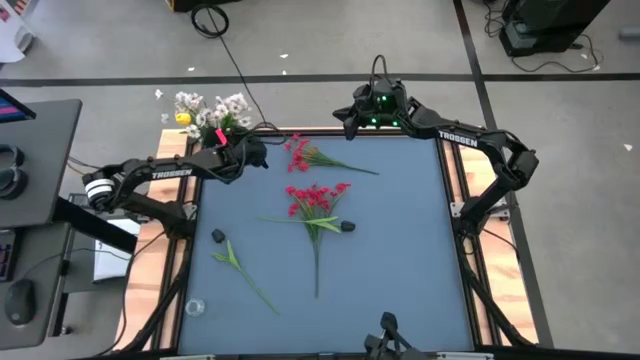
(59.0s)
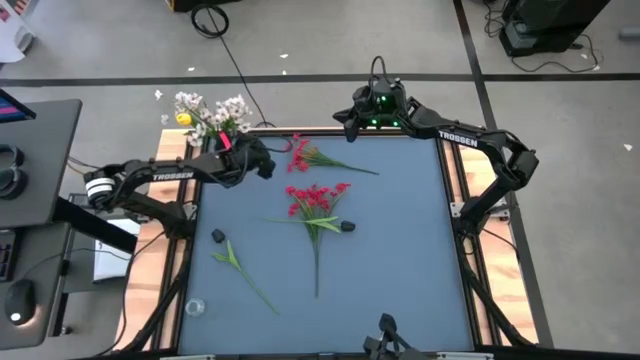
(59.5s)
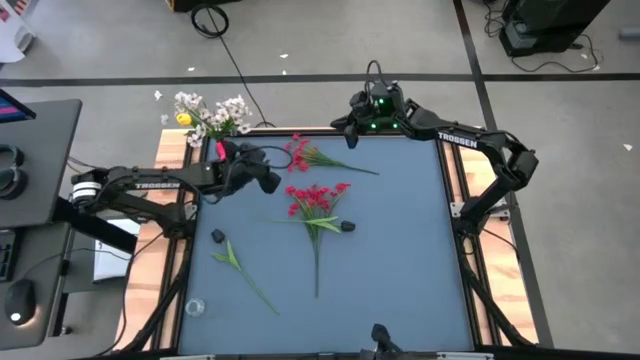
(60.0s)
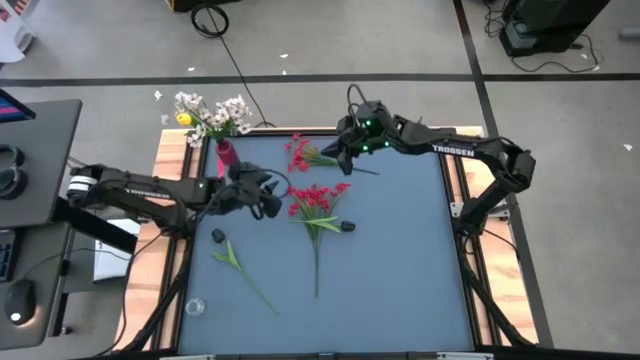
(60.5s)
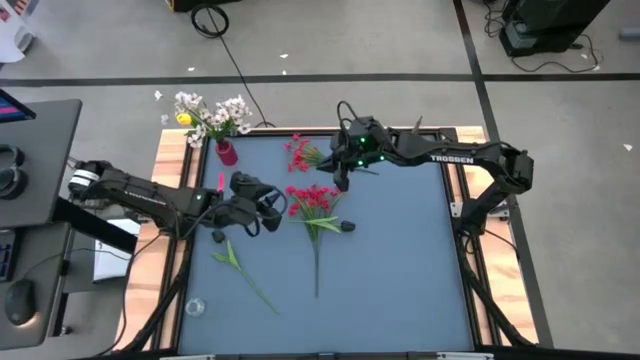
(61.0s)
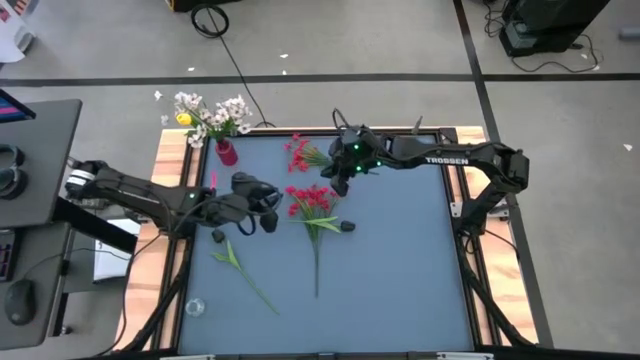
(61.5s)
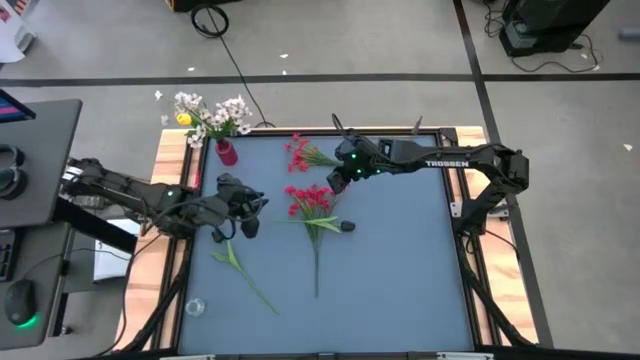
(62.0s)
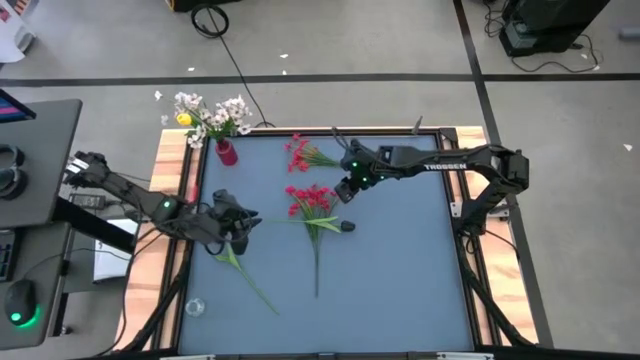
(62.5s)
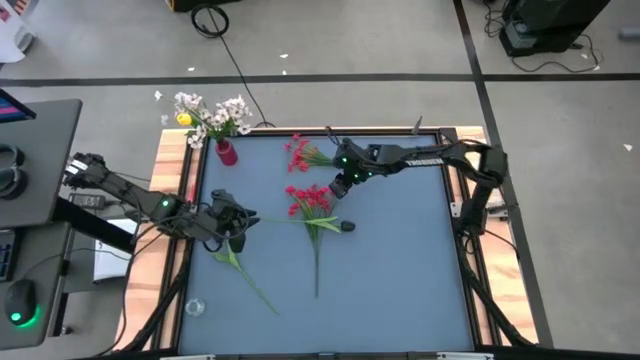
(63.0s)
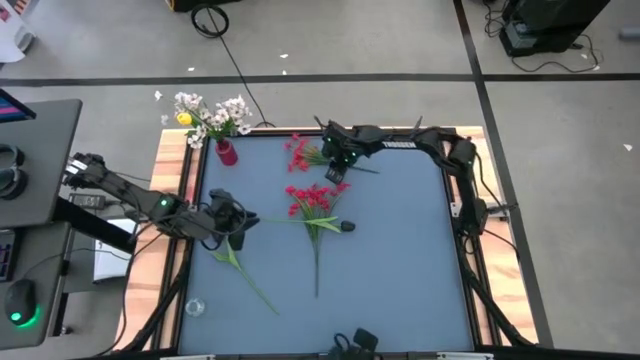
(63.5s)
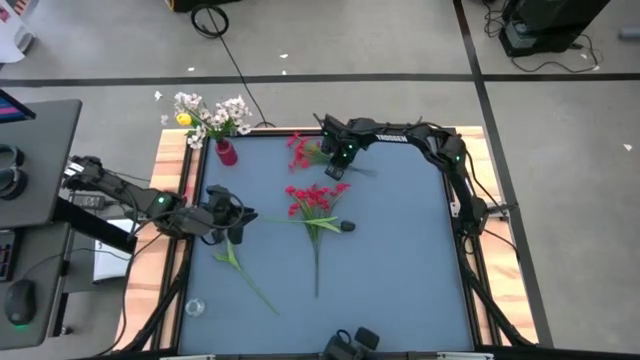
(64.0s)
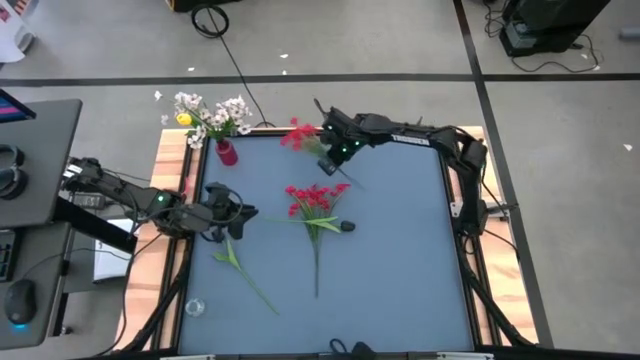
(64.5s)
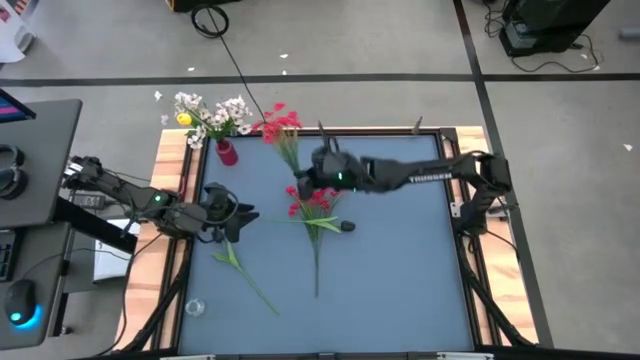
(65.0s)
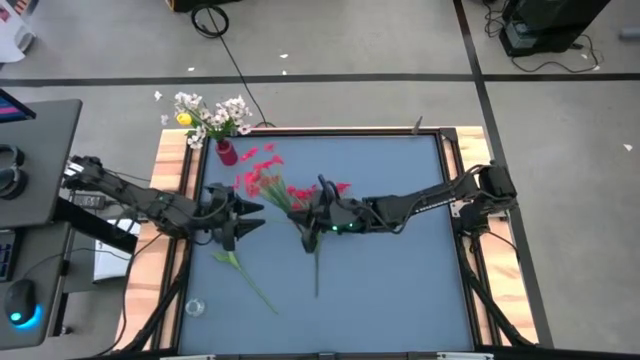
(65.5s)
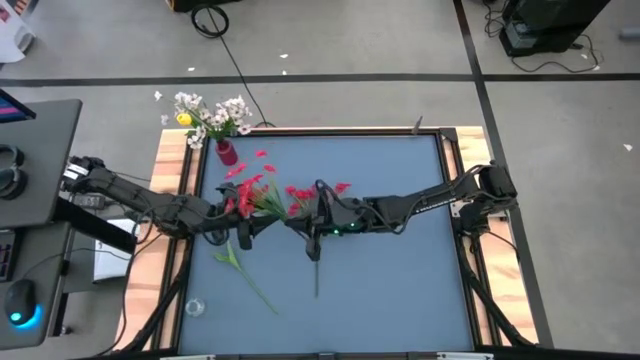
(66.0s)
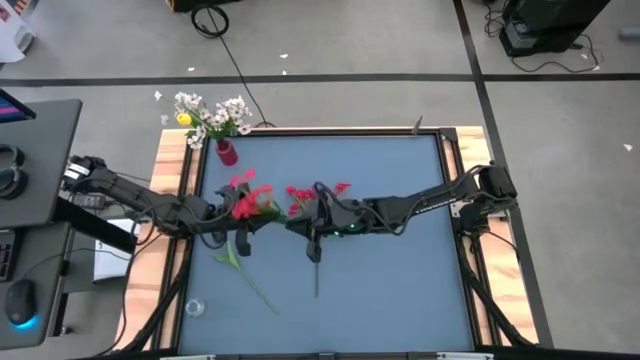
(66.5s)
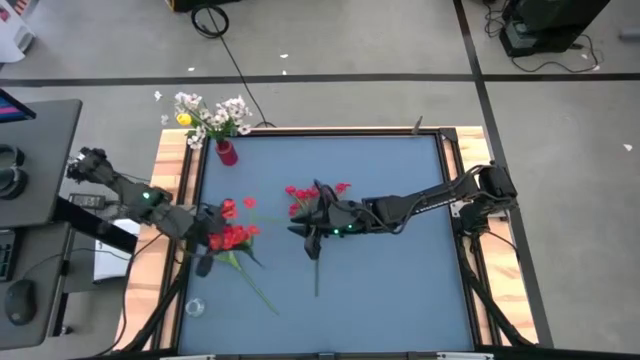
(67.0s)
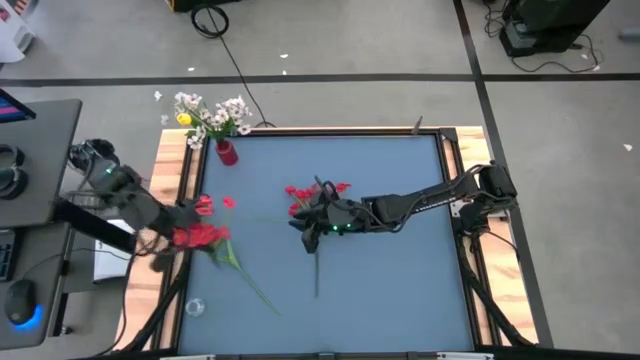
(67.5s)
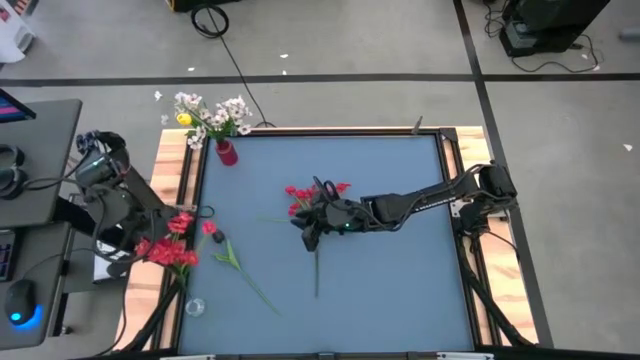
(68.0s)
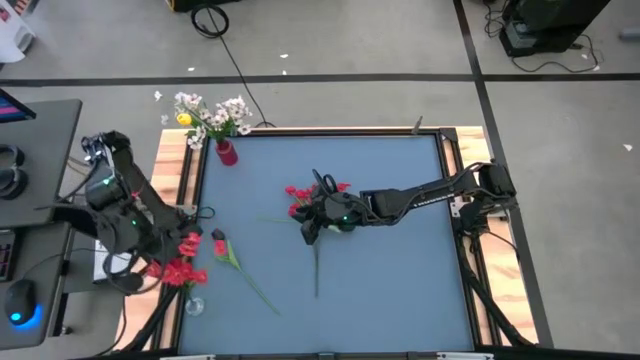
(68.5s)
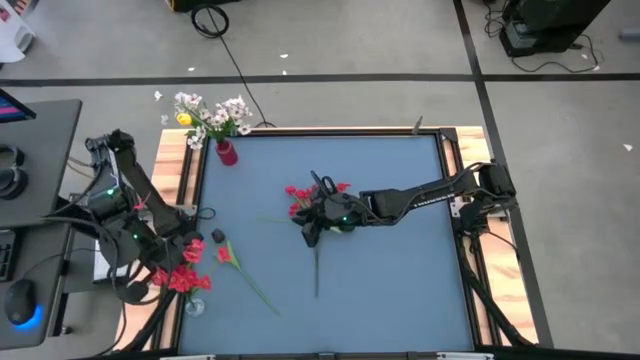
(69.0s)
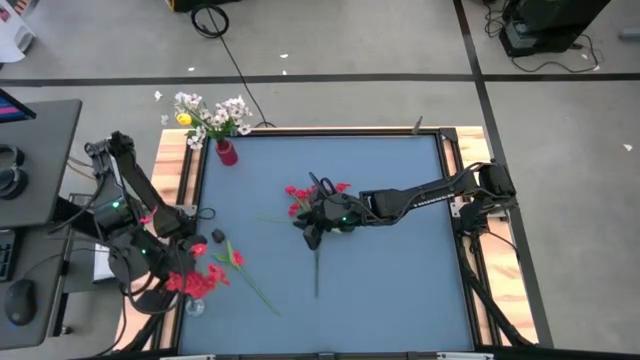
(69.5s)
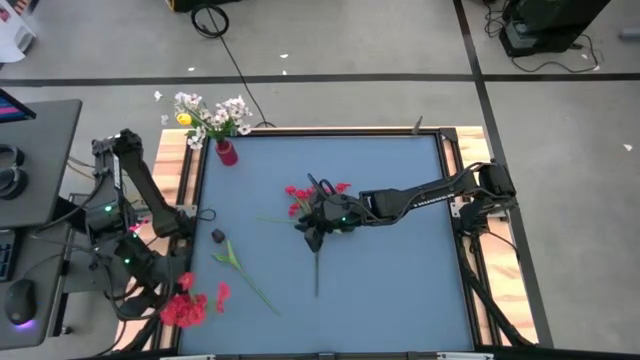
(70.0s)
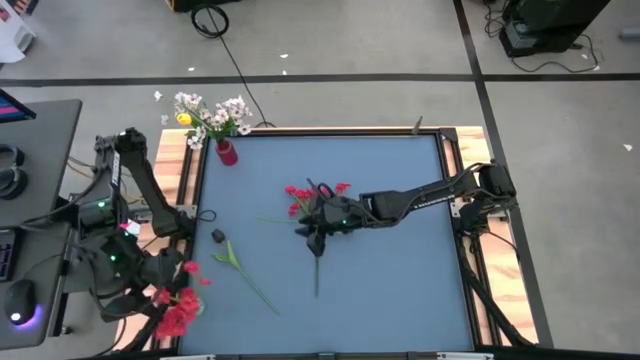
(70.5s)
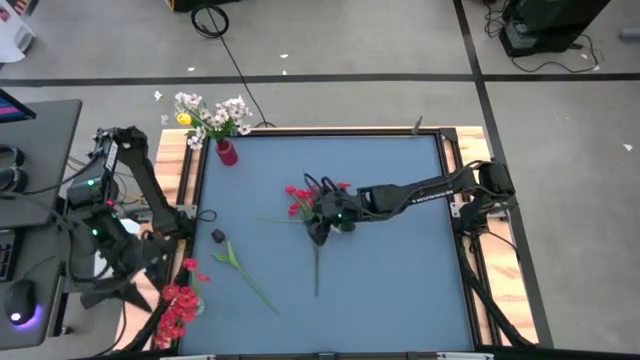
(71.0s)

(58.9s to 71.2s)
Task: Sort flowers into vase by color
Put the top red flowers into the transparent vase

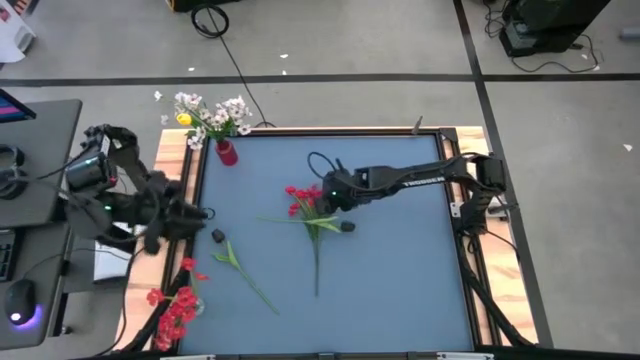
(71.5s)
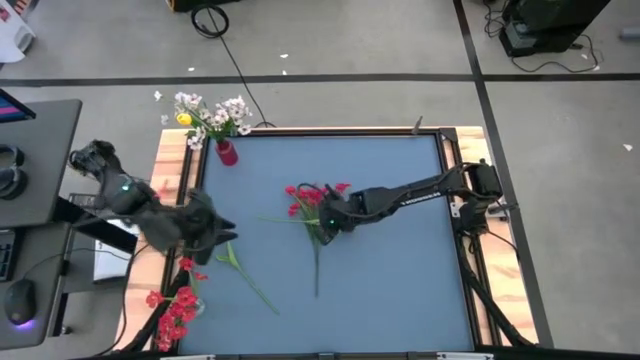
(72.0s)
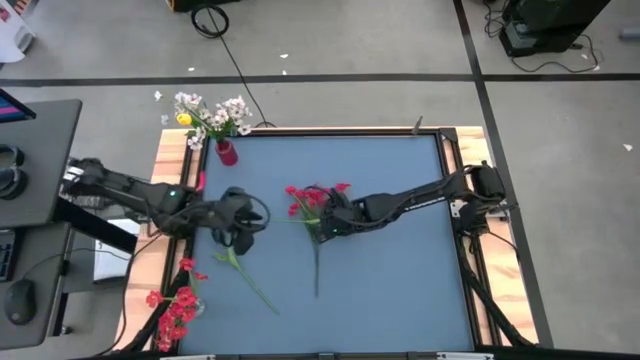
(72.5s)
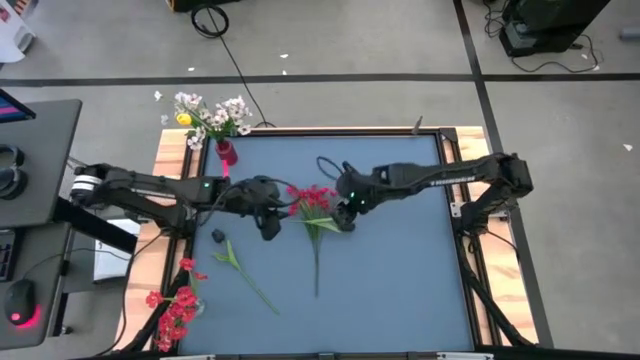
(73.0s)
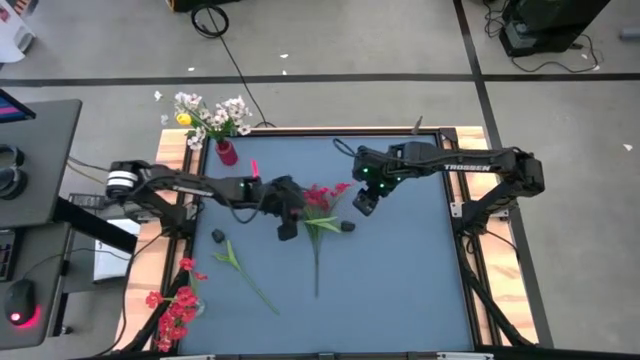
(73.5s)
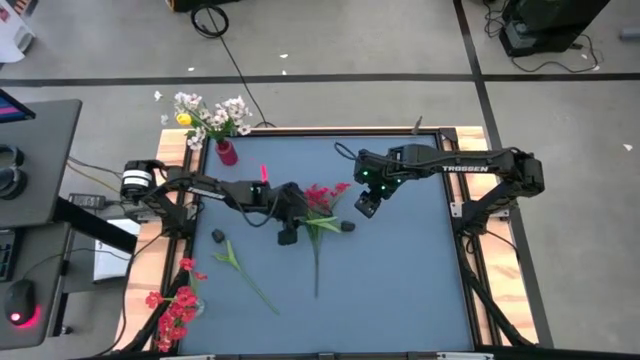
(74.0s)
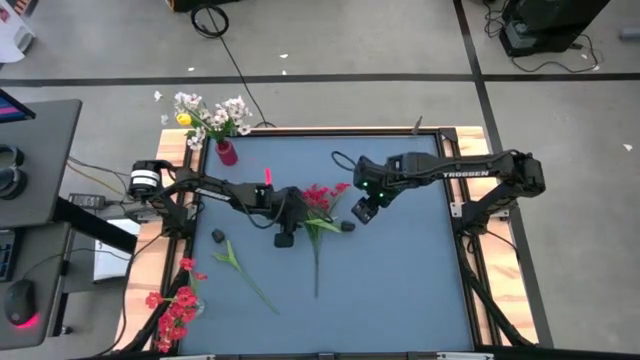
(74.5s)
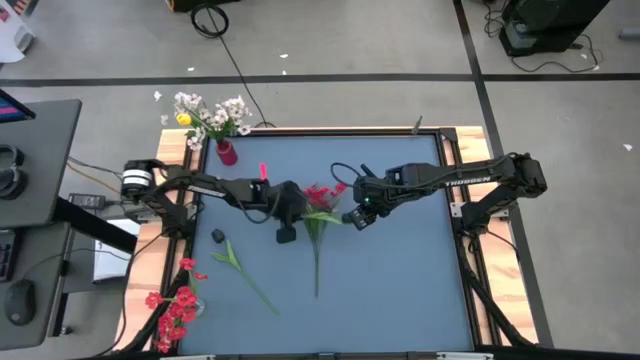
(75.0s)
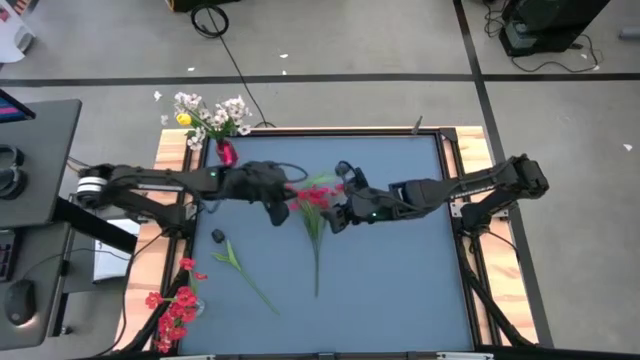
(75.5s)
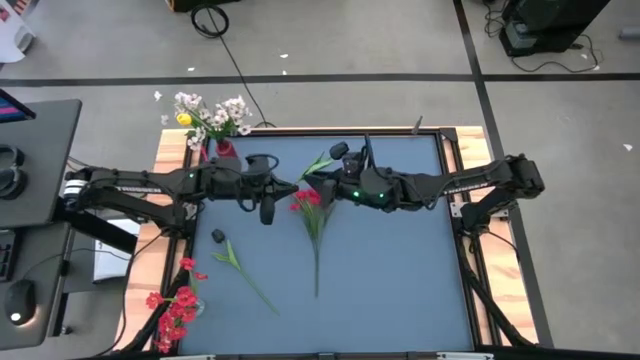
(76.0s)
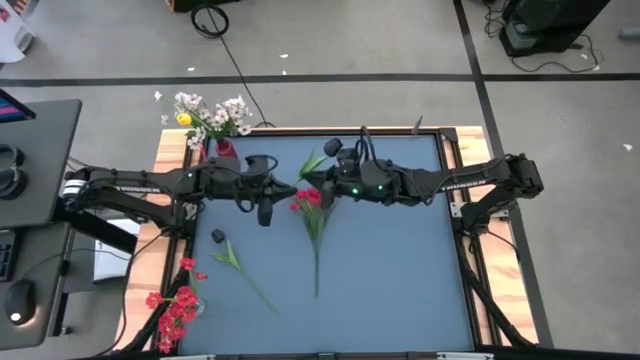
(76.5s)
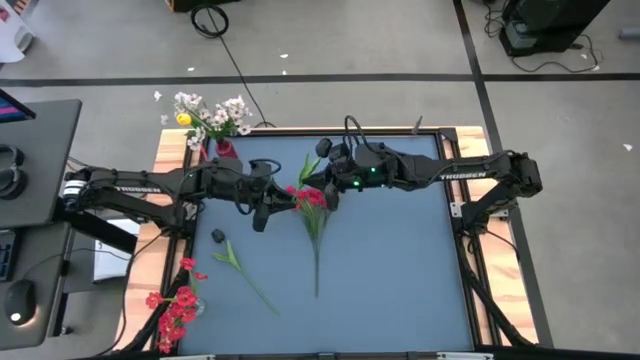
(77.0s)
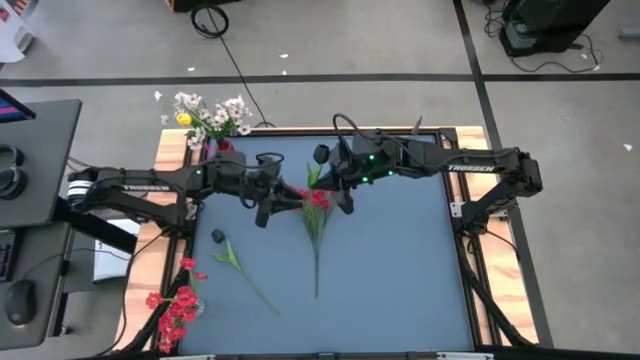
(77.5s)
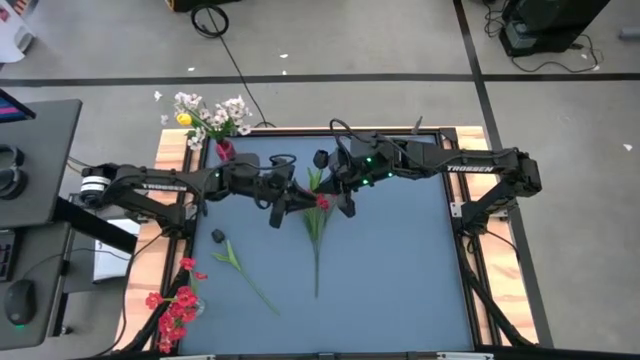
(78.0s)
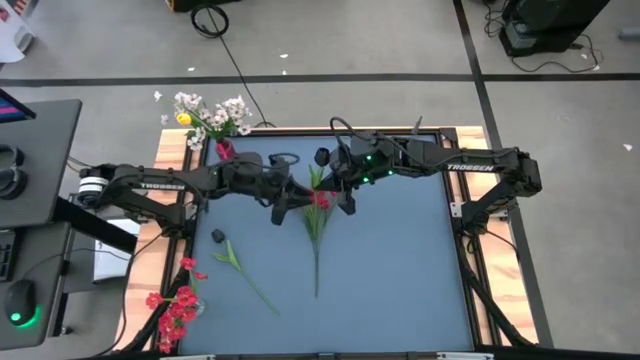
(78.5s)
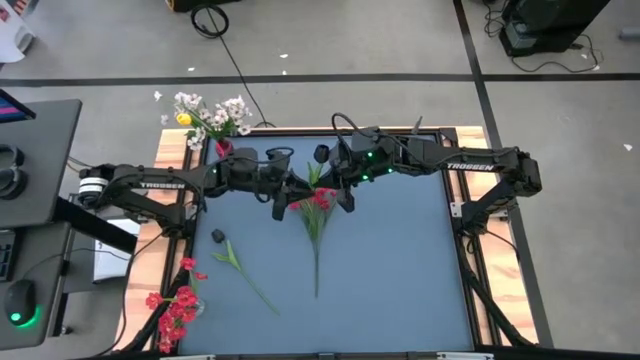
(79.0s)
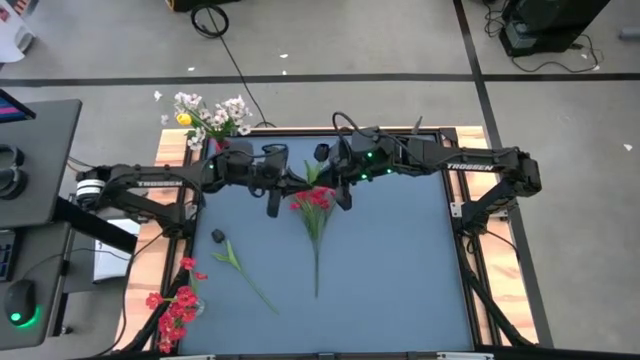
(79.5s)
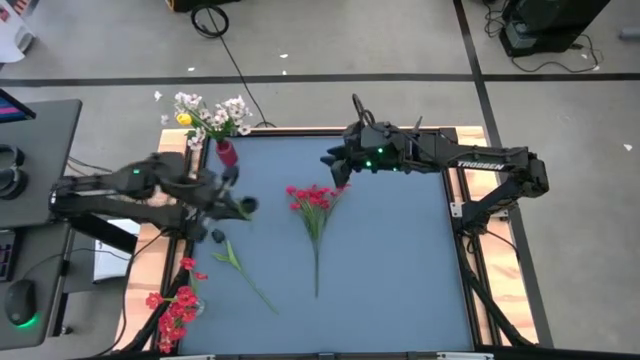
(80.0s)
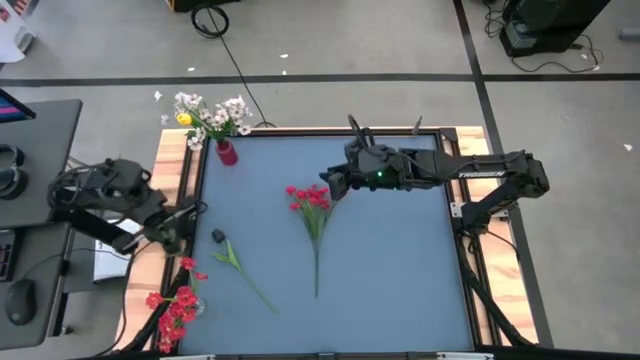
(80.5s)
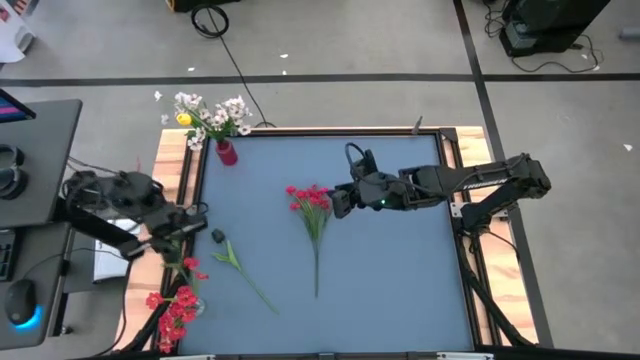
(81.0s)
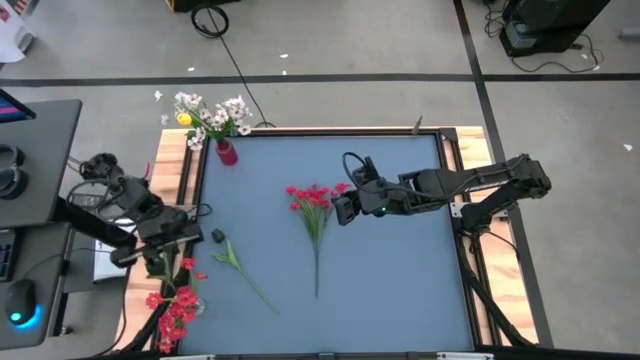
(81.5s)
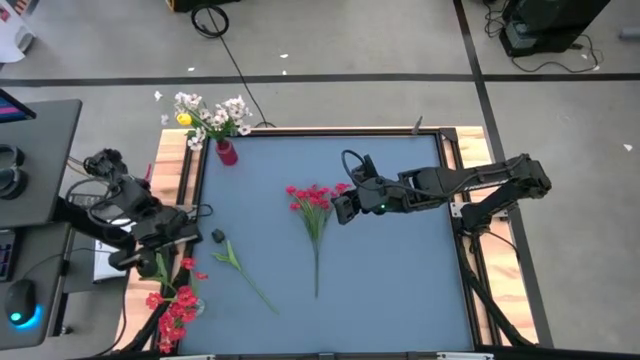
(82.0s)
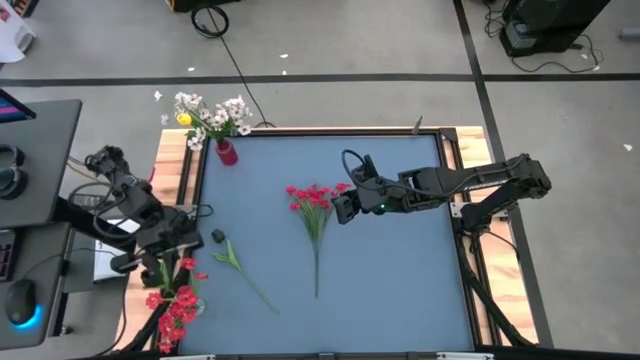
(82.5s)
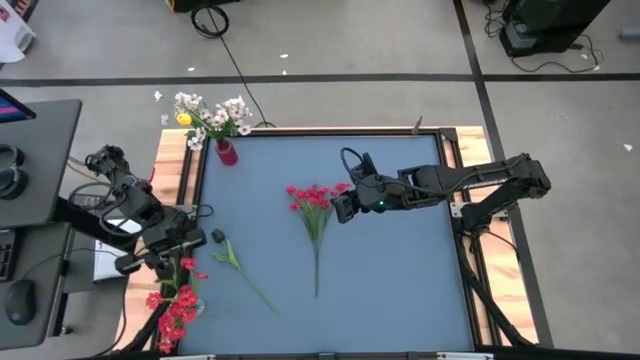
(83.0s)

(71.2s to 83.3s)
Put the right black tulip flower into the transparent vase
